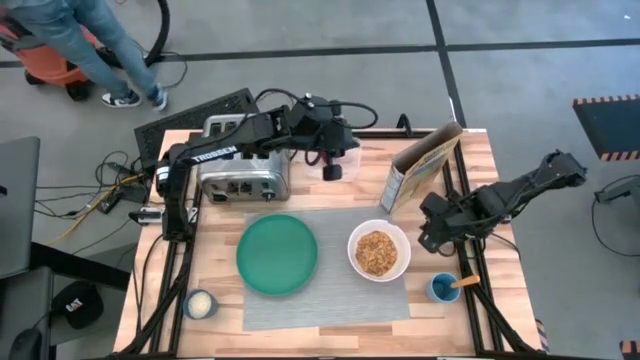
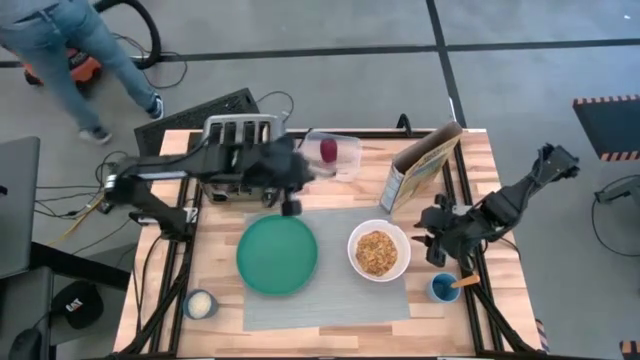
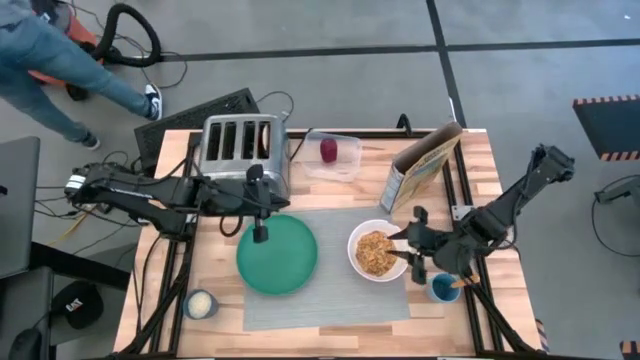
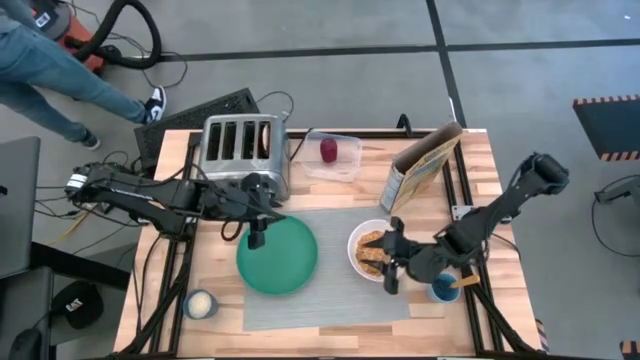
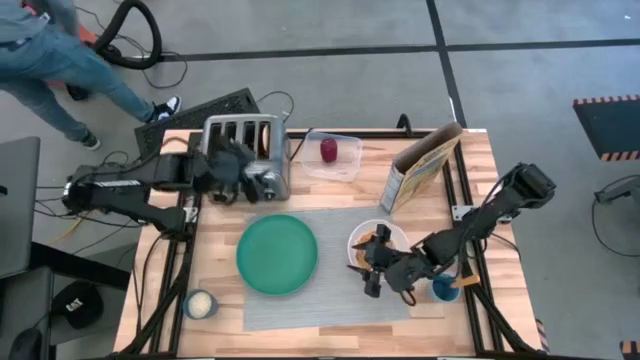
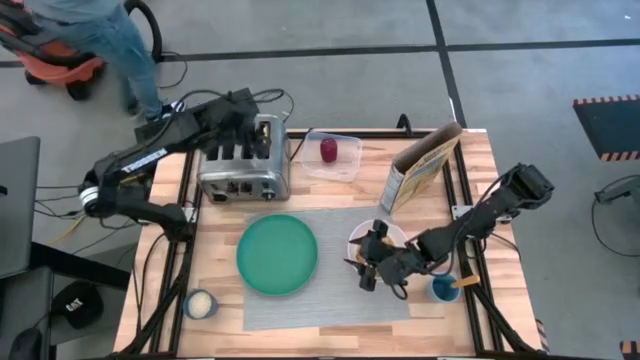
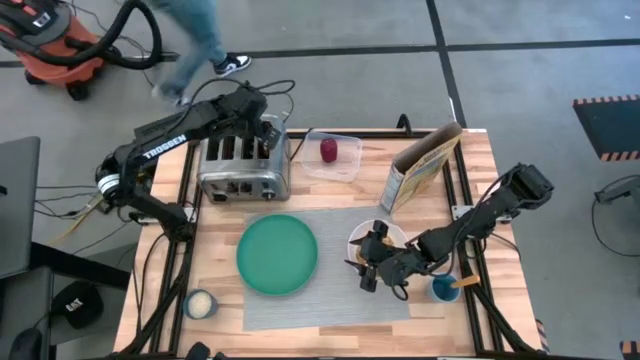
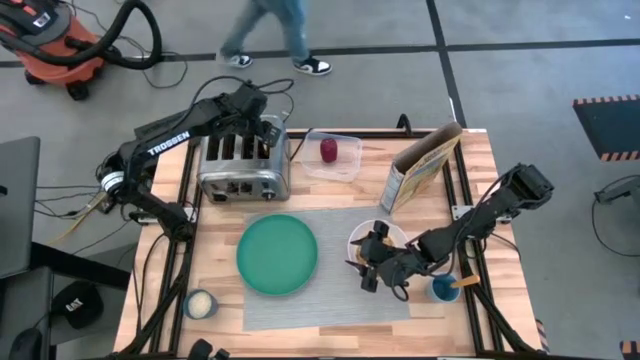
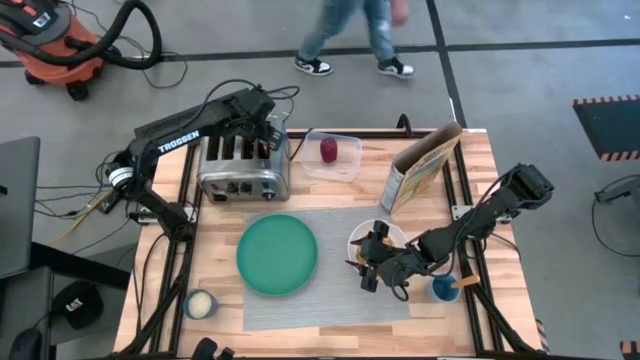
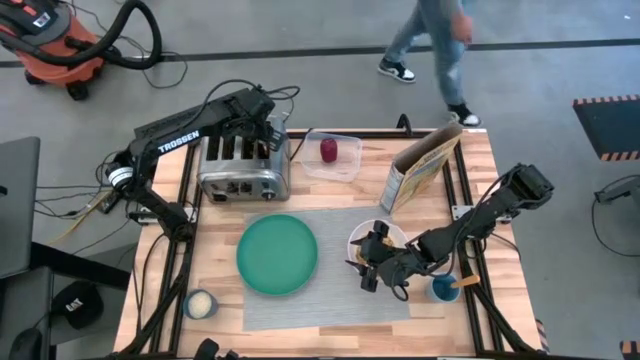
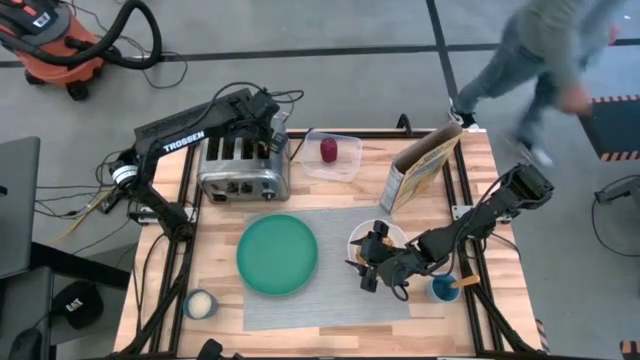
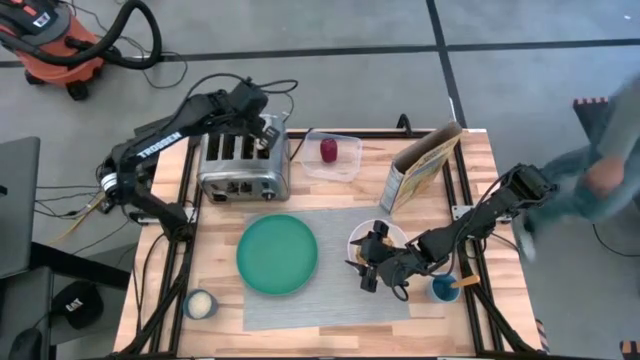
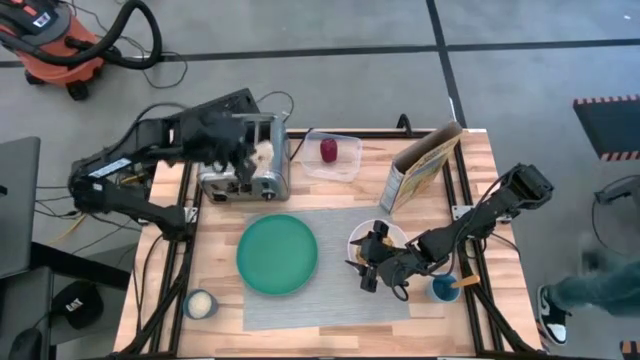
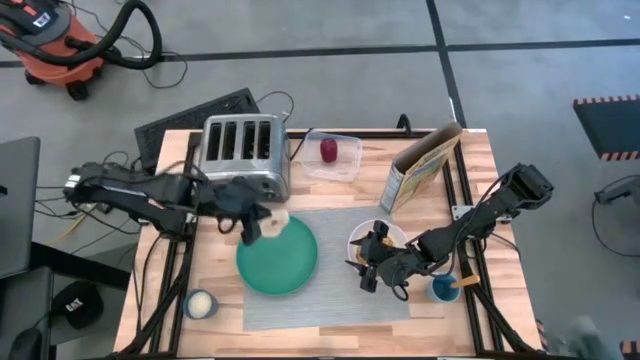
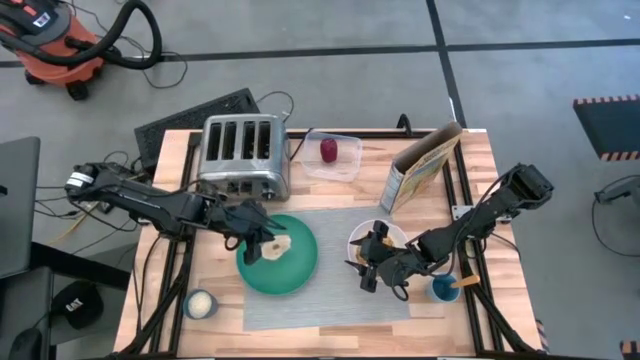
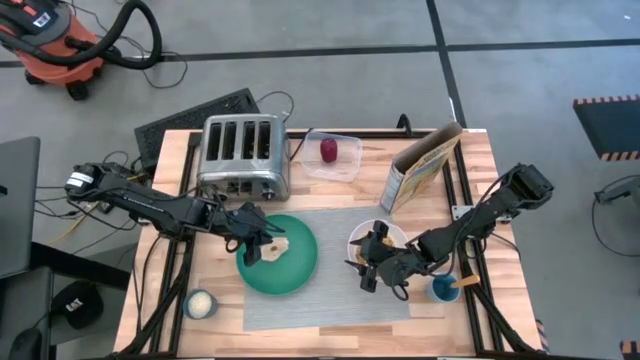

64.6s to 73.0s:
Task: Arrange a breakfast setting
Put the bread onto the green plate

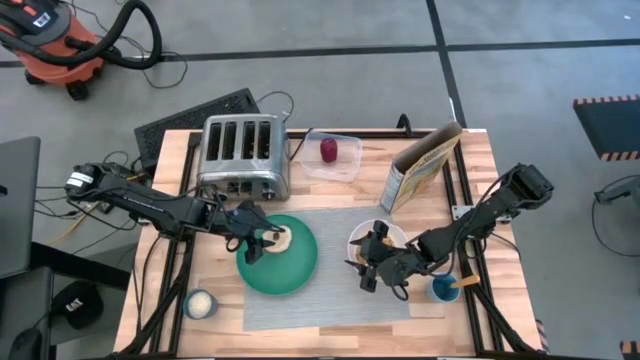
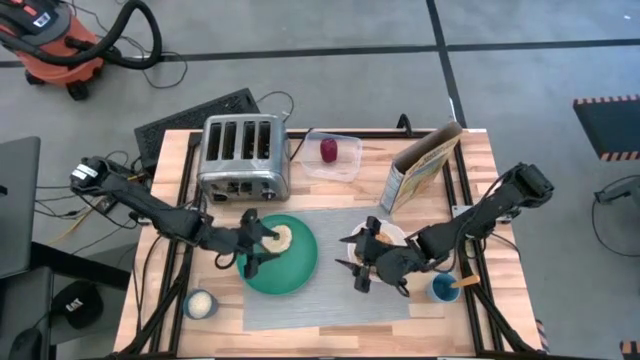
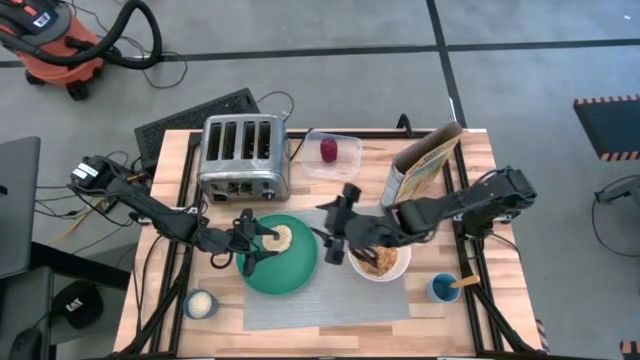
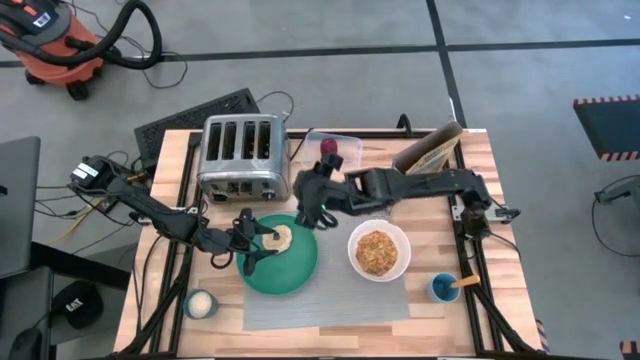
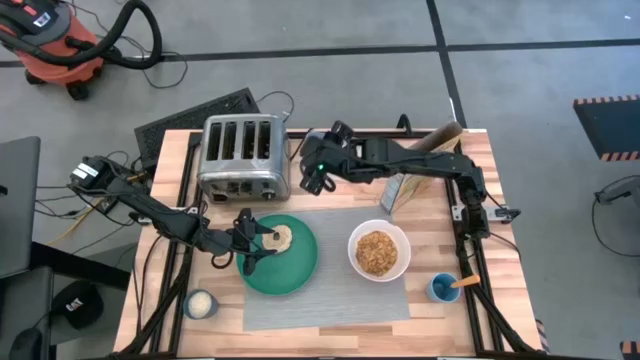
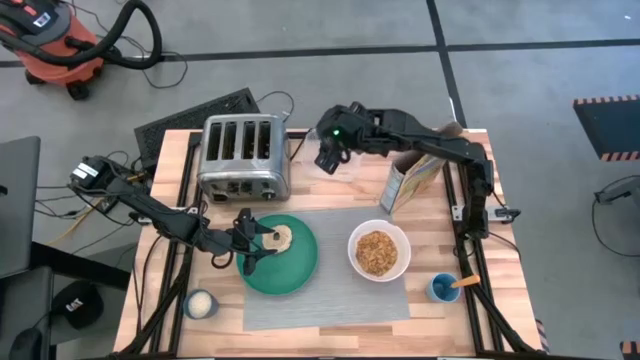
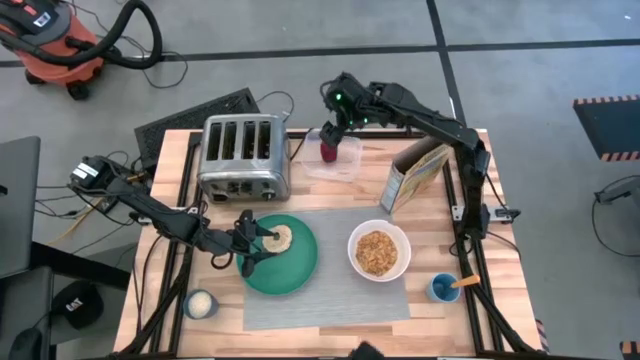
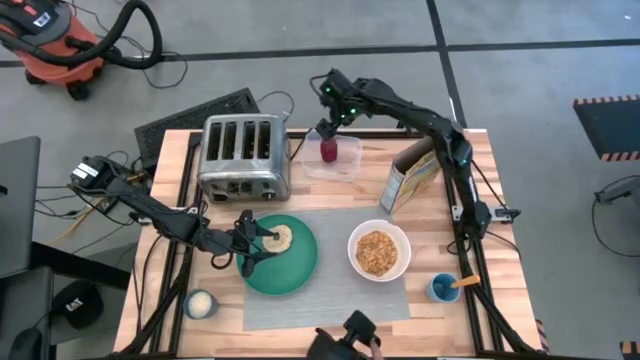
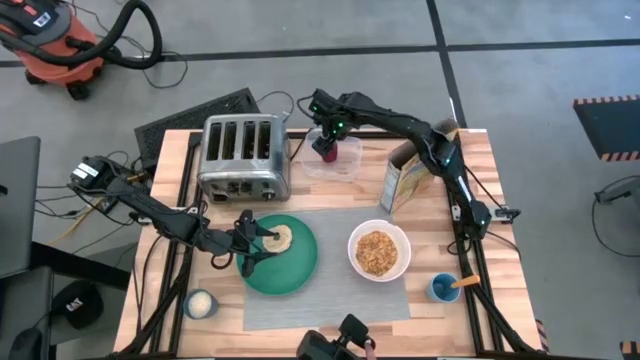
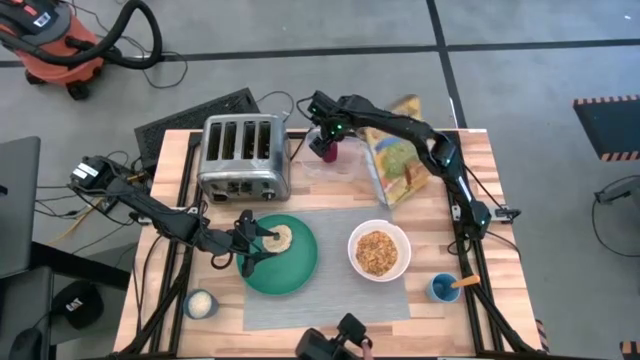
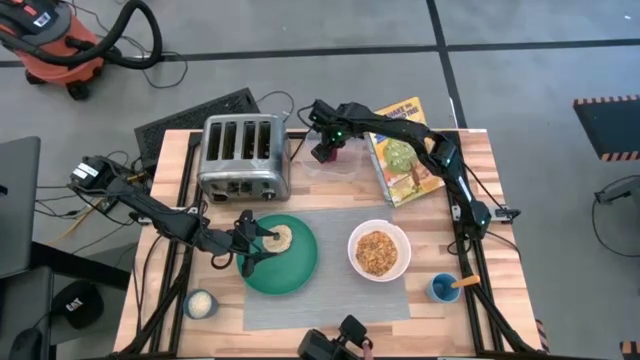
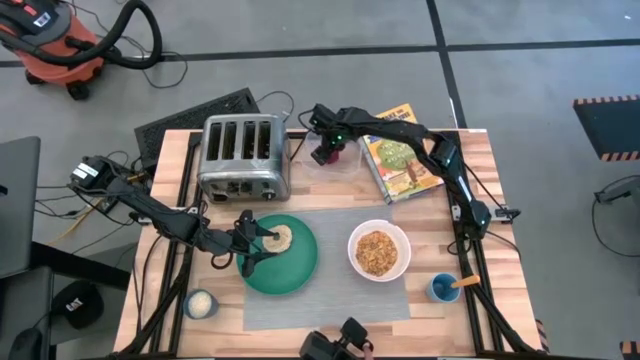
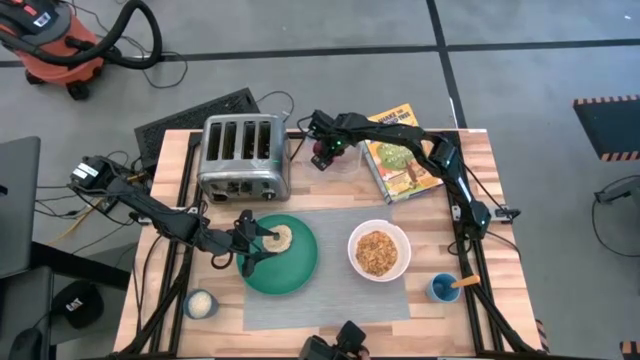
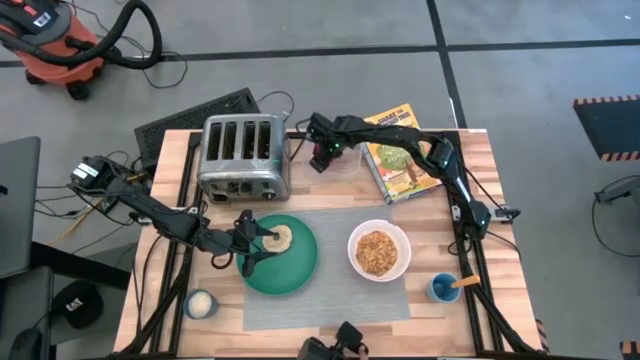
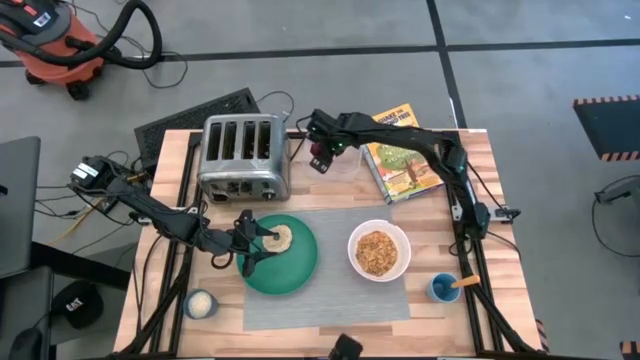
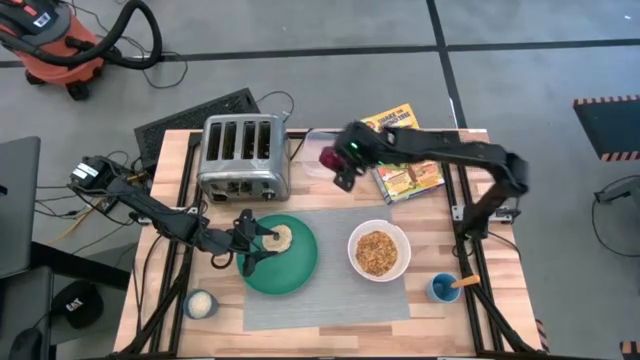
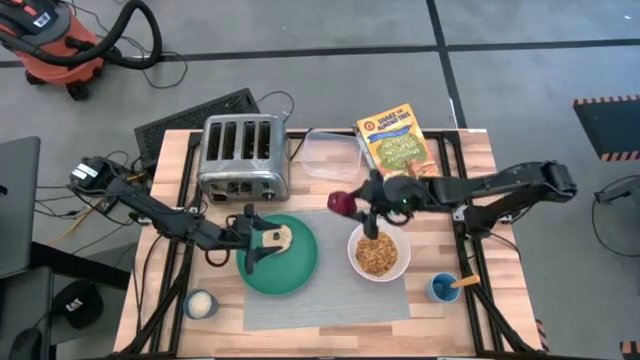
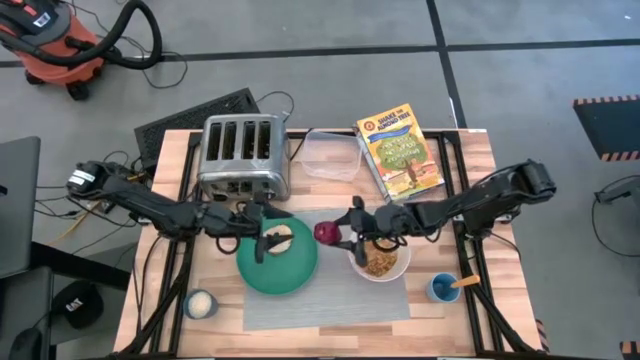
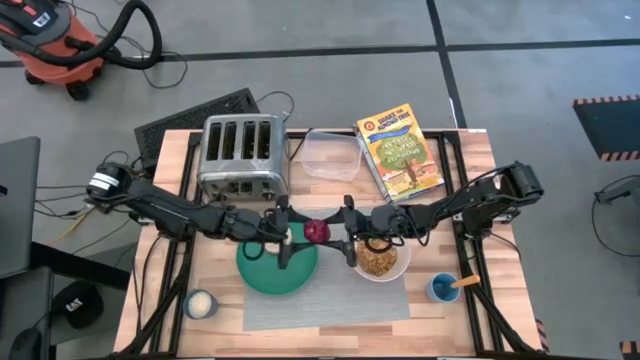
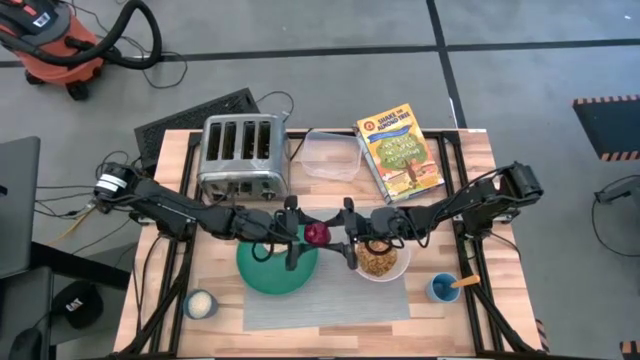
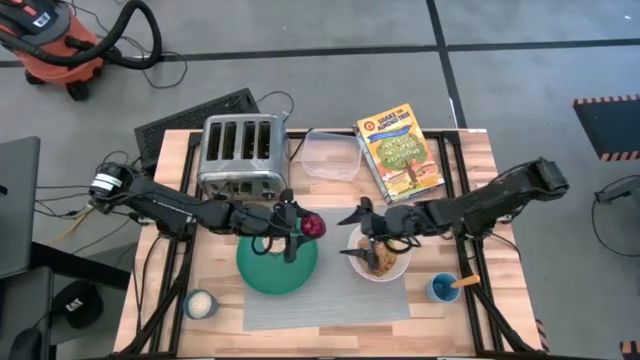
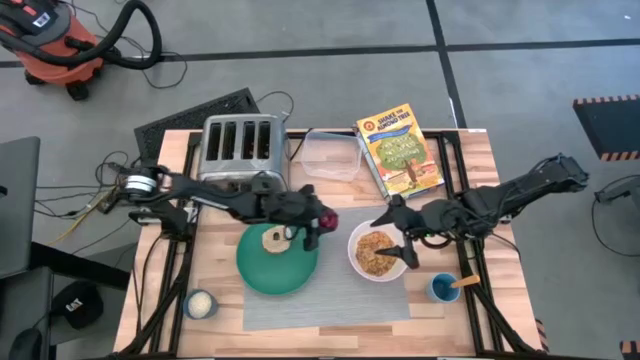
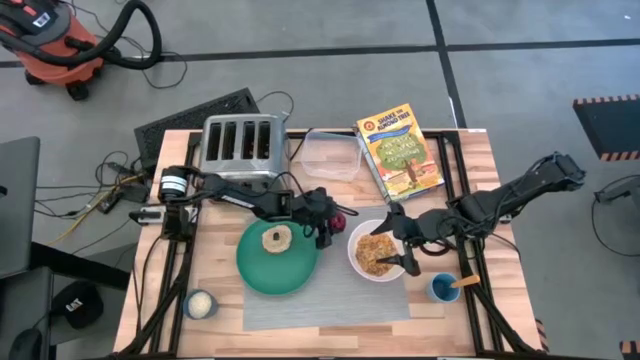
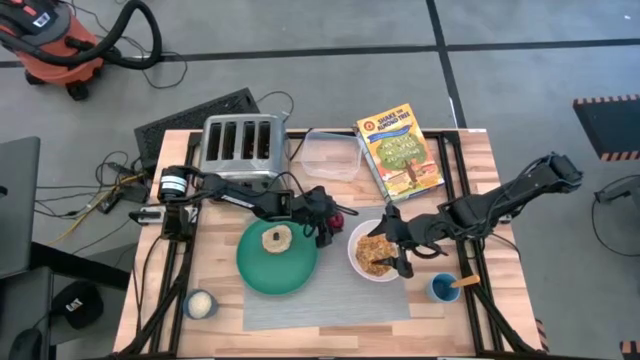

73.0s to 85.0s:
Put the apple on top of the gray placemat

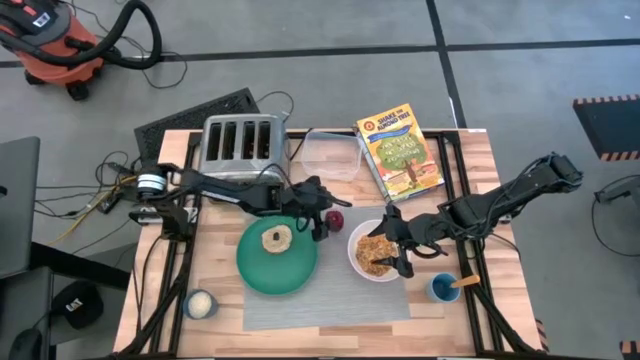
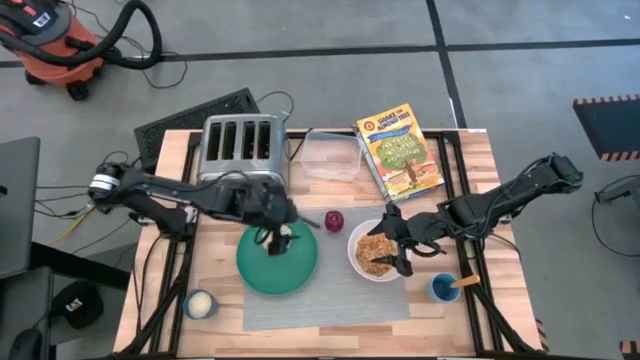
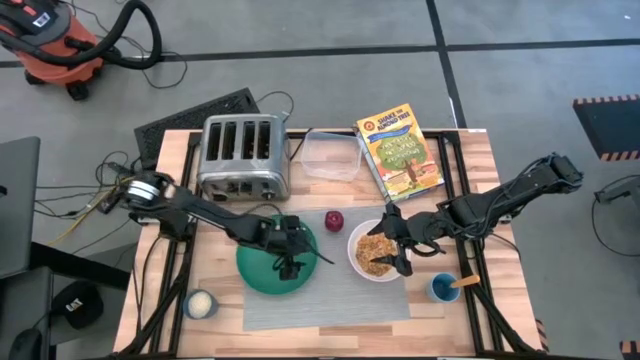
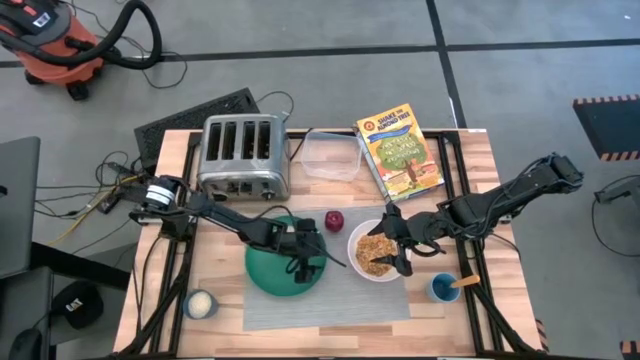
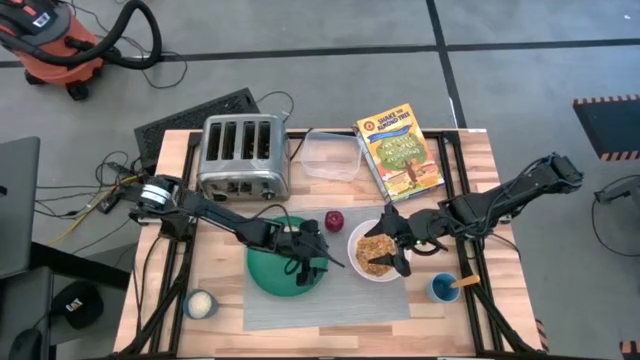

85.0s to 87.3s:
Adjust the green plate on the gray placemat
